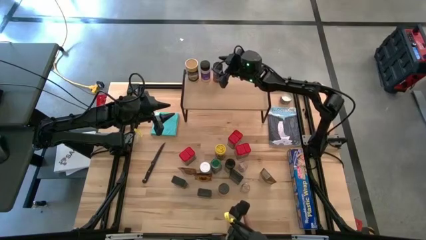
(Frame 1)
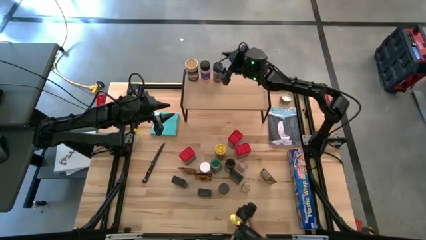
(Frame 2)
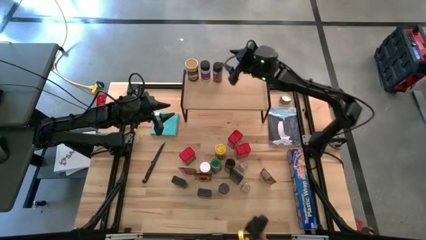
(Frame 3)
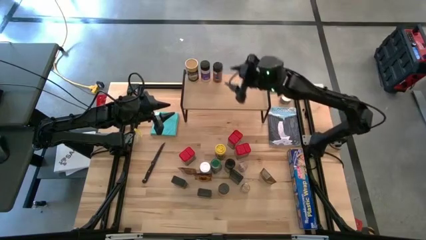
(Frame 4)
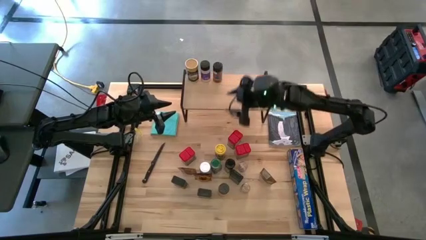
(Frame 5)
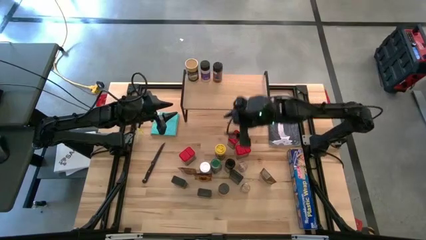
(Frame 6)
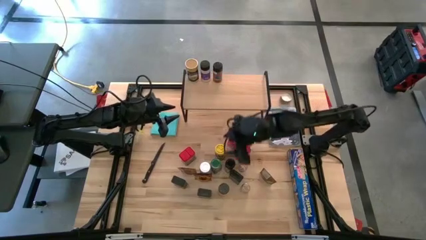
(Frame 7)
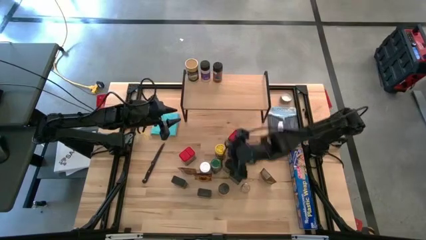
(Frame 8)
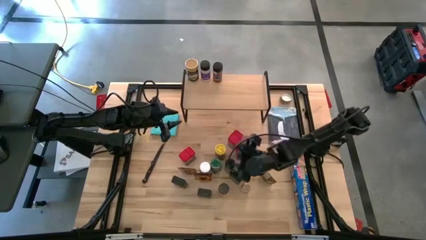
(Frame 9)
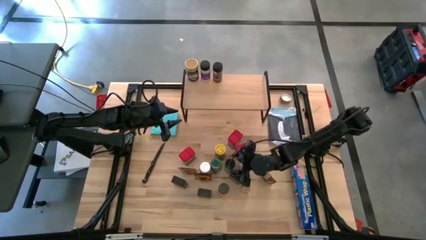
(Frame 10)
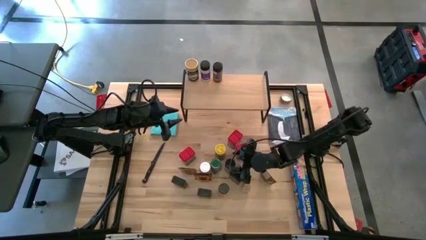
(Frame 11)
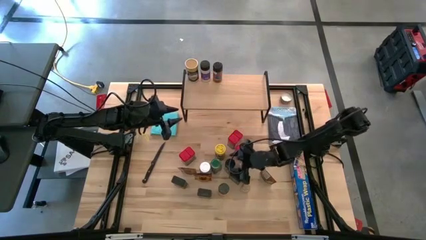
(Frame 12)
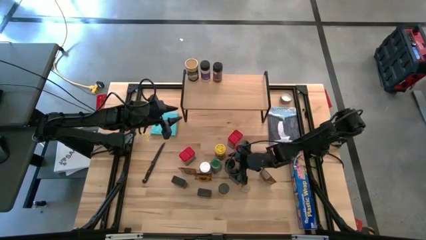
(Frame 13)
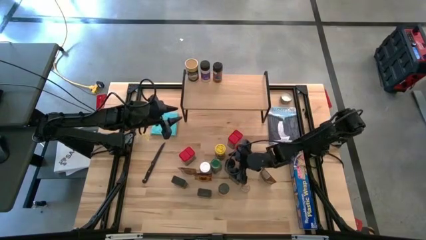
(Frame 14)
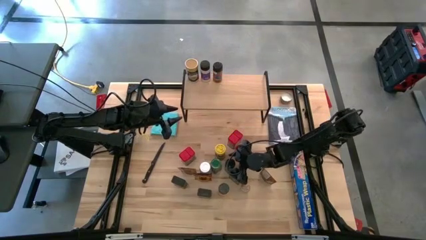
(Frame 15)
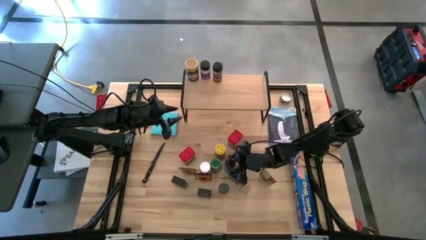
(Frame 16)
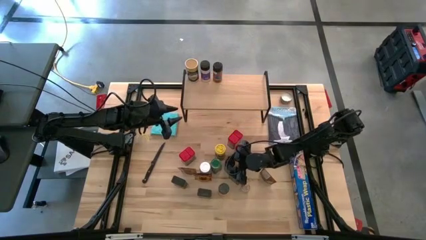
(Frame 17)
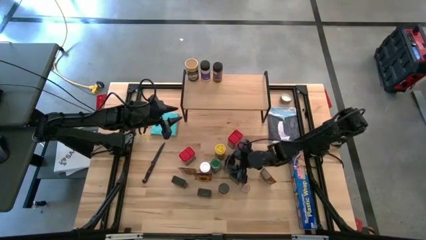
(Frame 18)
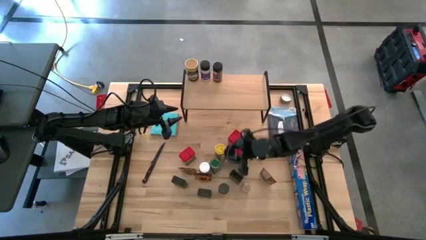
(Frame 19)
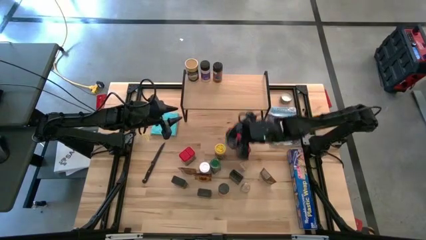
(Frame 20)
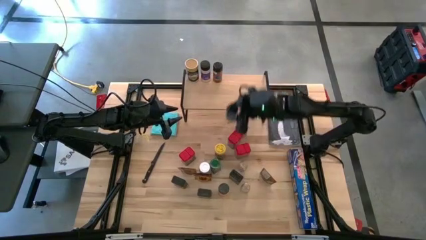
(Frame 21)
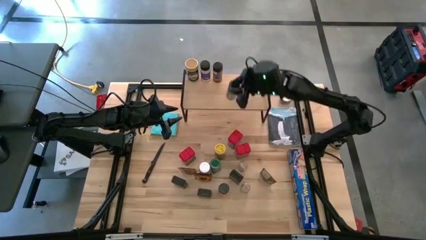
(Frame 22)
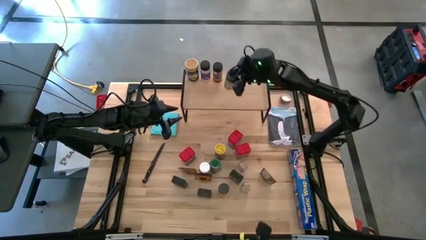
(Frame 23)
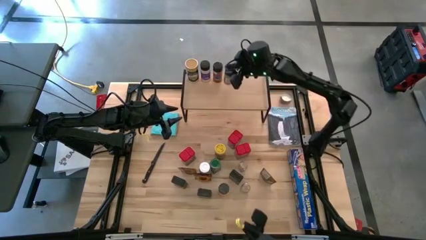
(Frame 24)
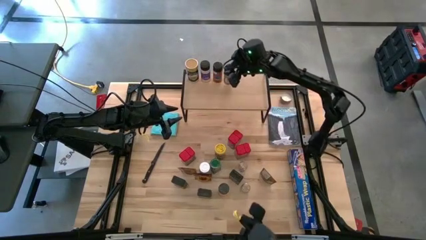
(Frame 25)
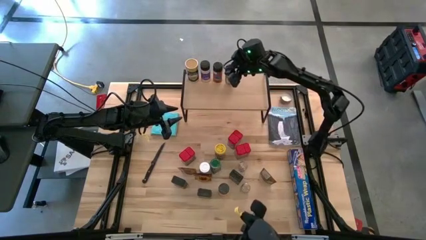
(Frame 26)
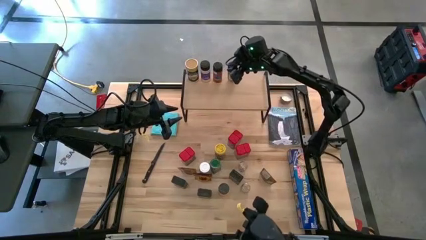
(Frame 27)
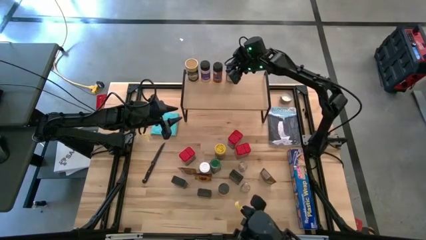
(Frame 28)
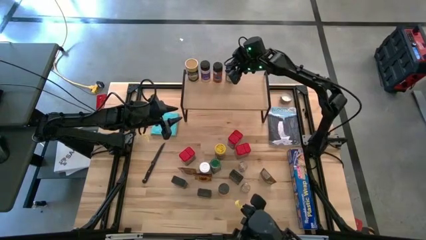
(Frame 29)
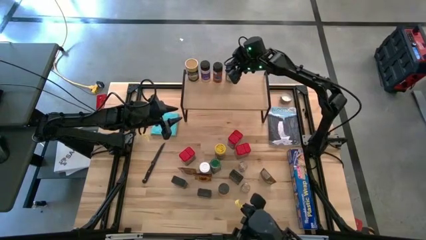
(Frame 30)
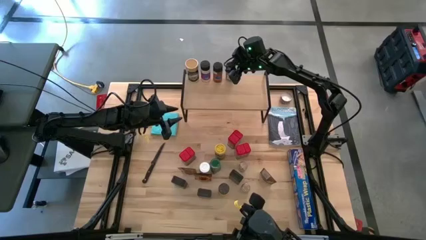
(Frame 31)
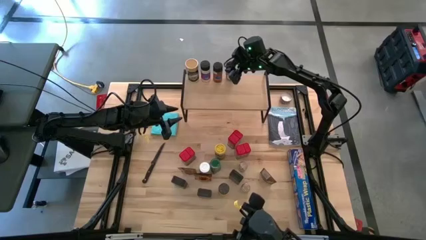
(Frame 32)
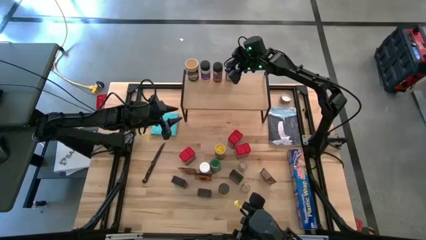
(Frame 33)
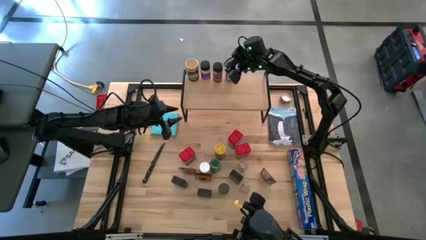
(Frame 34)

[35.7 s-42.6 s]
Task: Shelf spices
Put the black seasoning bottle on the shelf

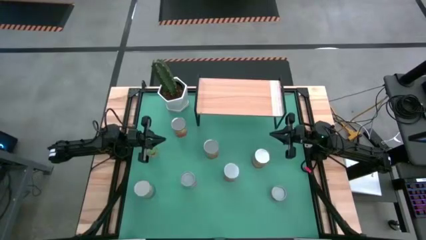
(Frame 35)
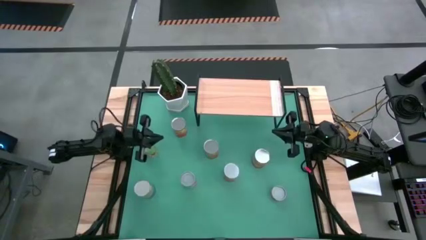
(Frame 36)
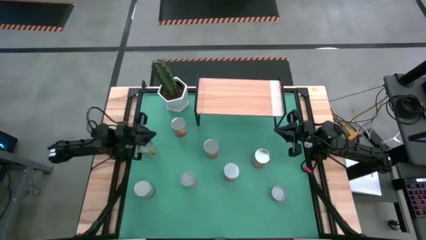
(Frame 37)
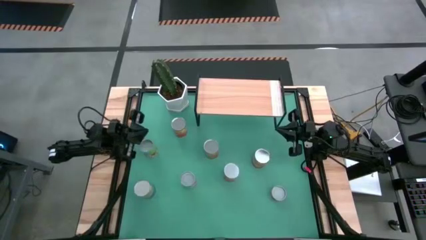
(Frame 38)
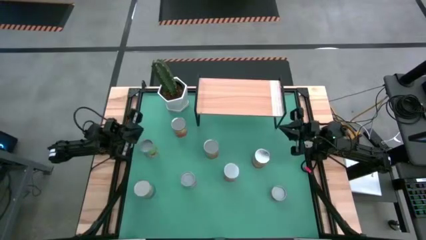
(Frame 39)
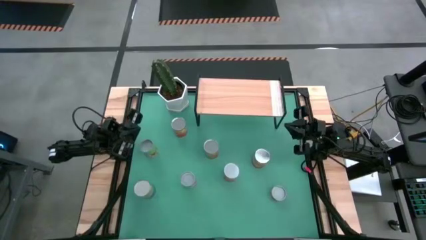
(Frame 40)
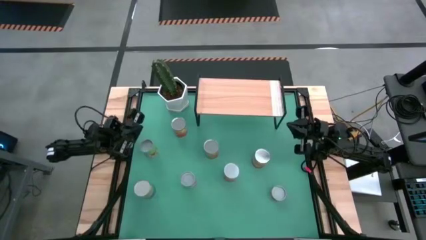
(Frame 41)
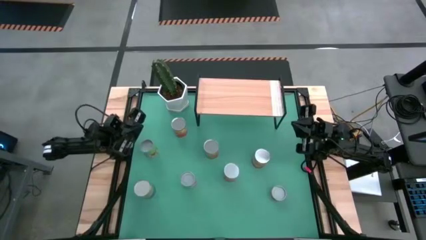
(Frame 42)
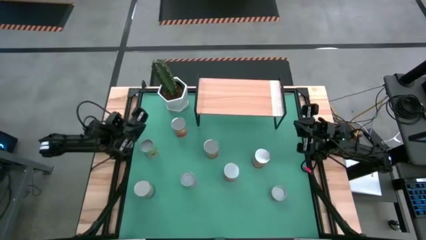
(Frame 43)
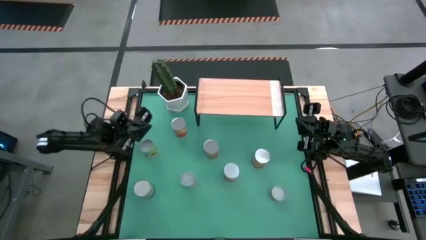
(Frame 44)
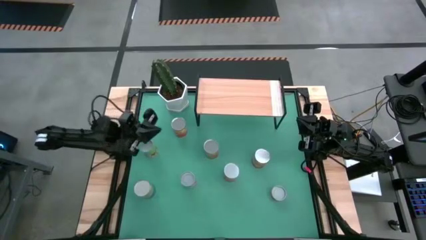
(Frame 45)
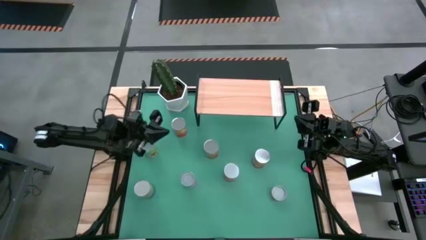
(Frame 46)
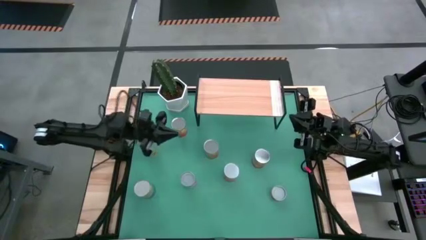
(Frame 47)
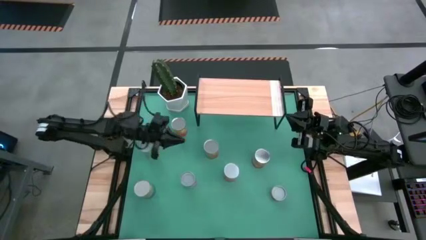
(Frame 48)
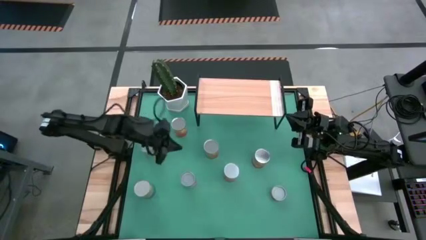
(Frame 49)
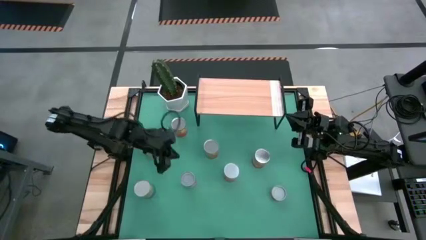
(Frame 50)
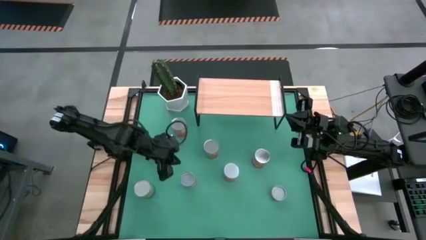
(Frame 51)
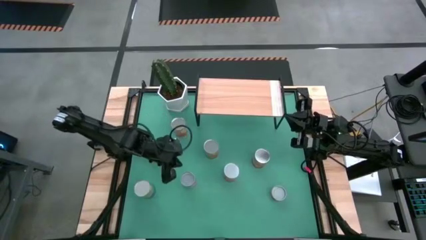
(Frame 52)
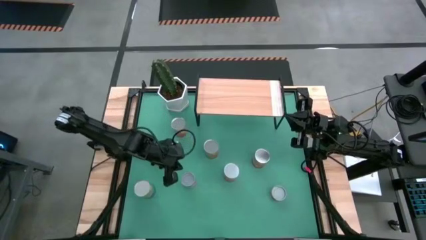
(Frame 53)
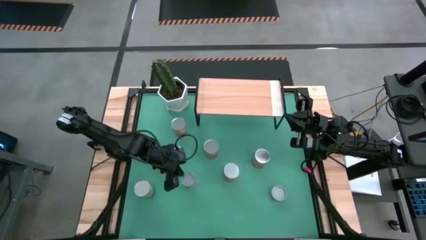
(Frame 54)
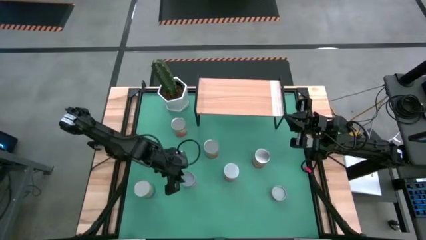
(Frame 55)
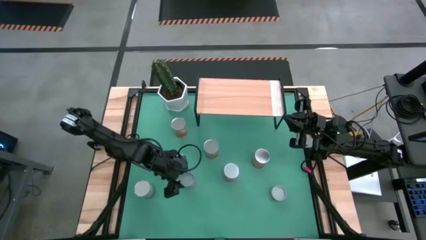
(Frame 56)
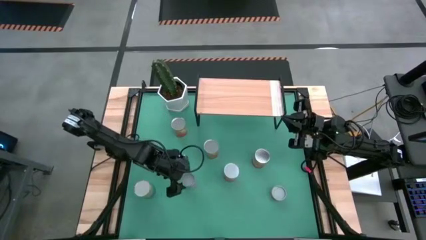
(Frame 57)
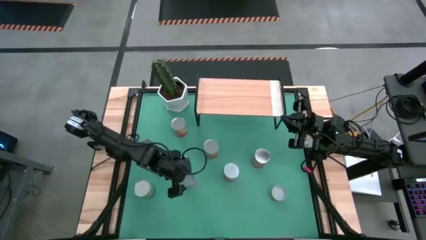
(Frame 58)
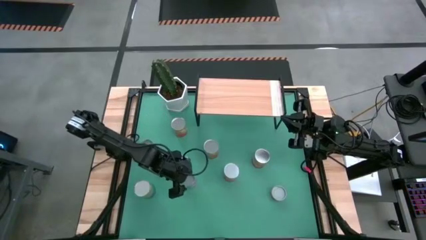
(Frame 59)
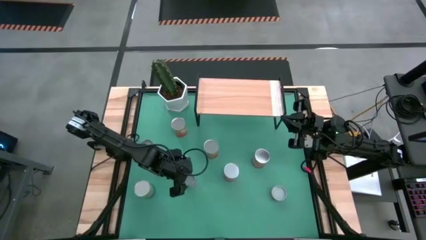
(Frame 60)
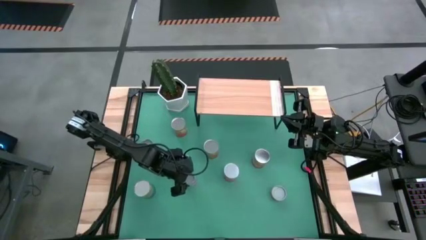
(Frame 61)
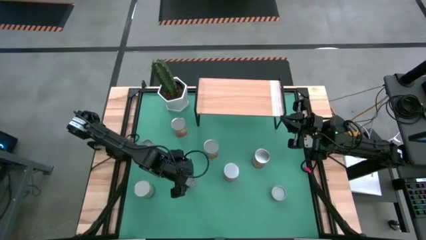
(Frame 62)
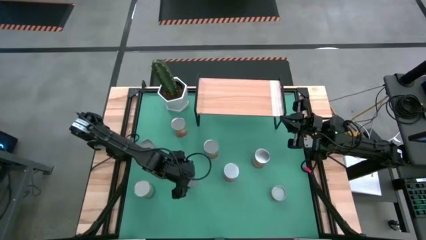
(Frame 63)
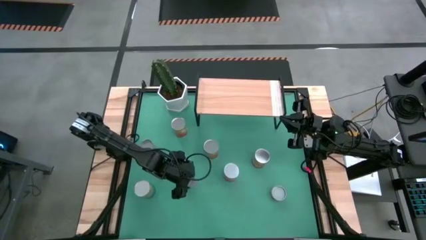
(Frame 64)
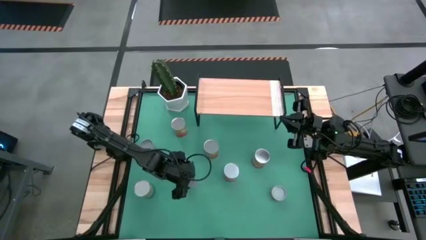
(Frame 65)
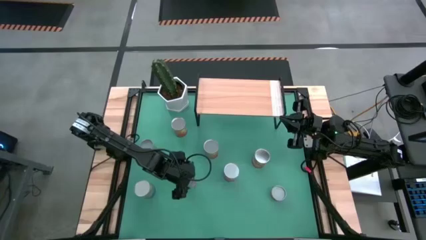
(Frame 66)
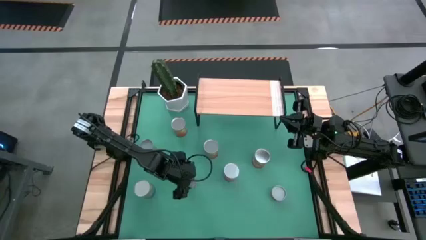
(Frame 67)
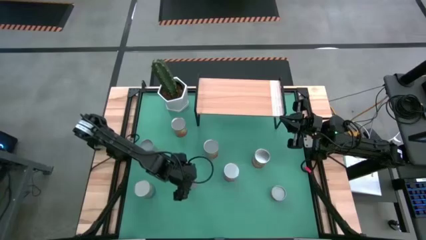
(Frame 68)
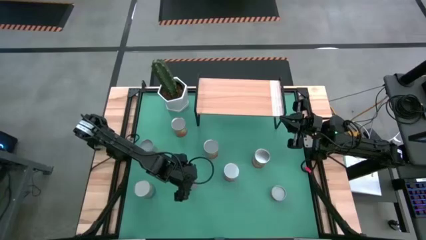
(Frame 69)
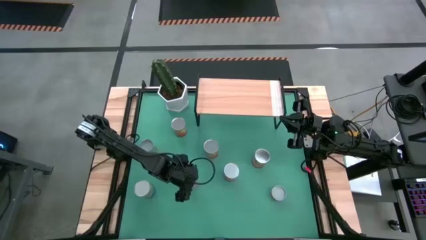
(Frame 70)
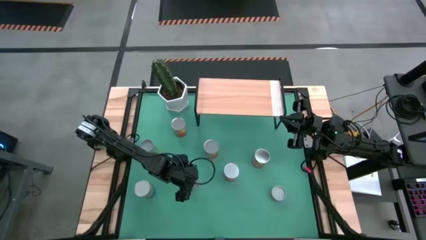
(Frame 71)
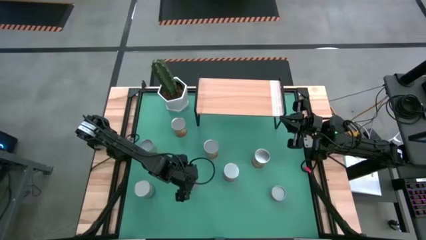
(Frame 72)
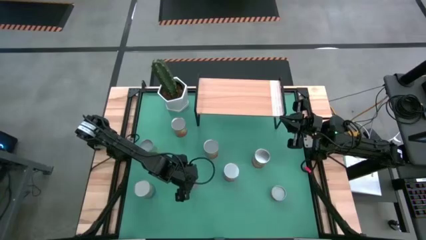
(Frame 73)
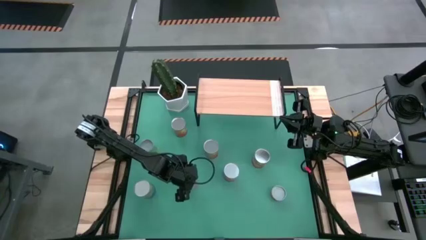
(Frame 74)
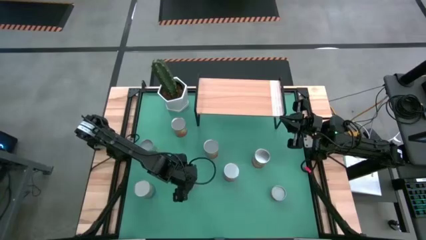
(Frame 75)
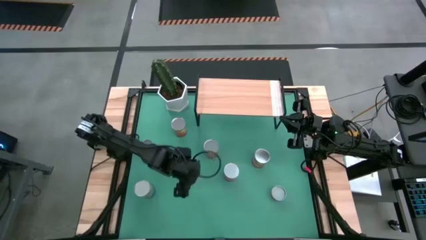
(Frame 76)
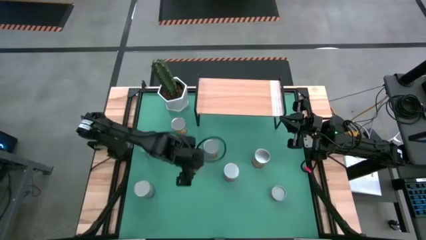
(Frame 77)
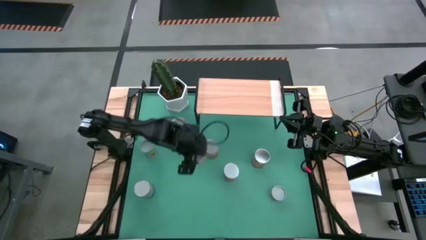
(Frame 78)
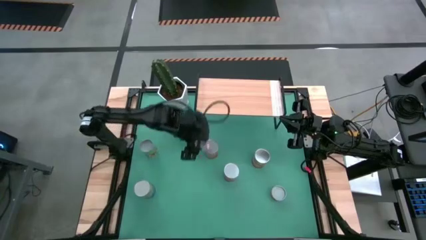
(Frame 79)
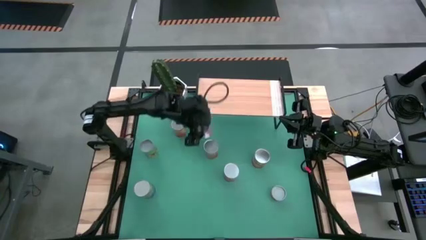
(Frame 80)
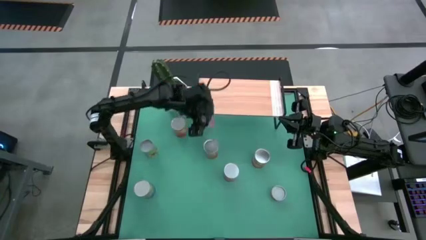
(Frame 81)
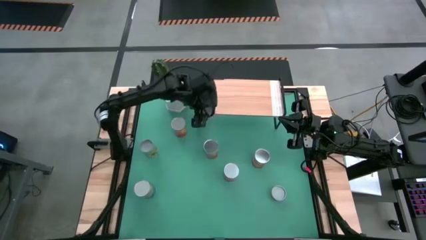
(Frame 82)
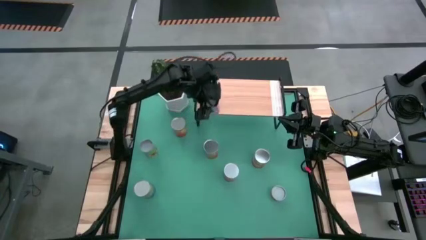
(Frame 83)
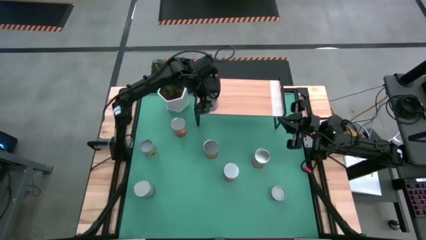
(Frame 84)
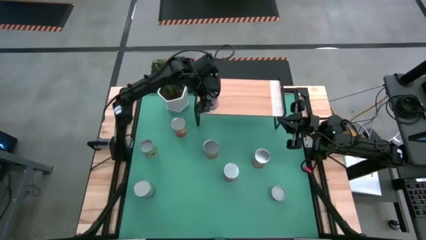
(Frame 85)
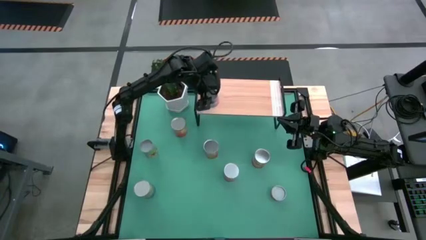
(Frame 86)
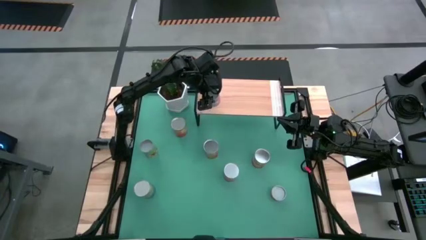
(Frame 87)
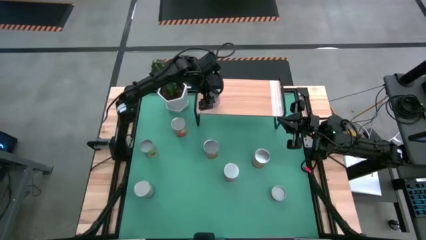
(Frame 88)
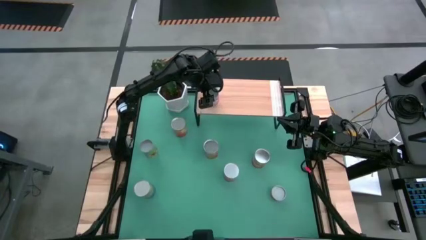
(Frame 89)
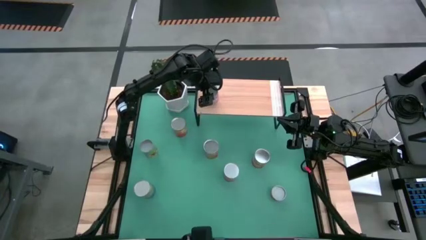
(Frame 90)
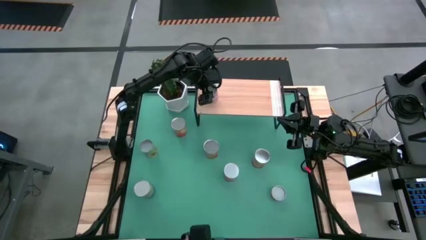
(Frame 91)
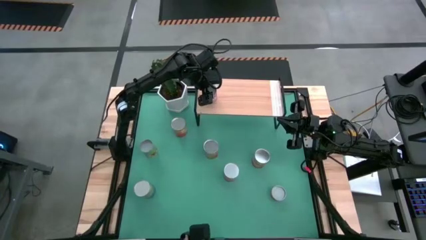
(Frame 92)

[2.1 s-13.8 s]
Task: Pick and place cans onto a shelf
Put the canned chicken soup on the shelf
